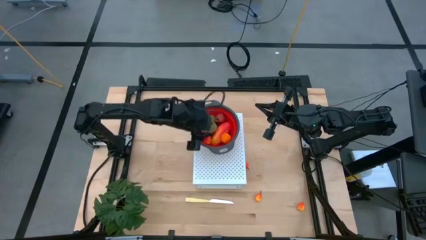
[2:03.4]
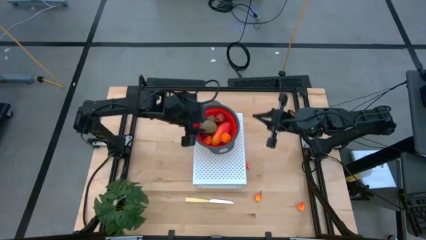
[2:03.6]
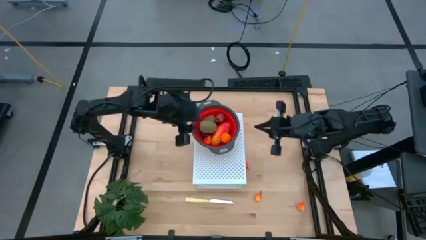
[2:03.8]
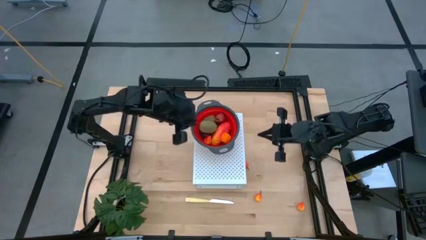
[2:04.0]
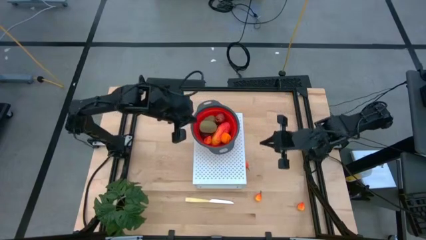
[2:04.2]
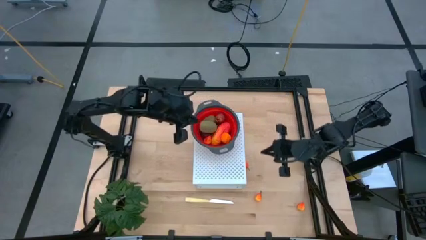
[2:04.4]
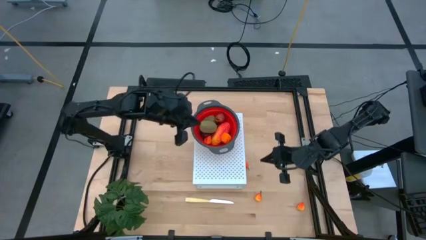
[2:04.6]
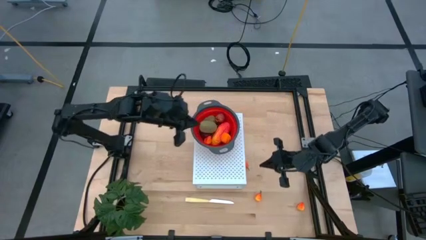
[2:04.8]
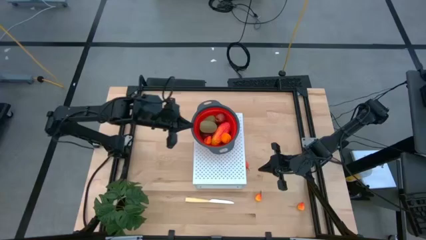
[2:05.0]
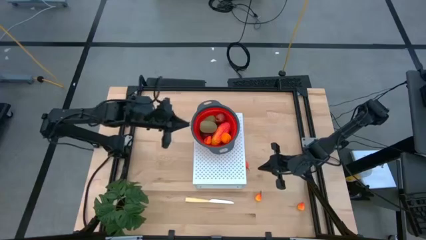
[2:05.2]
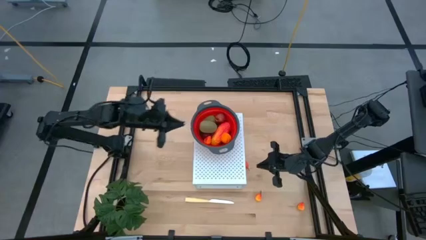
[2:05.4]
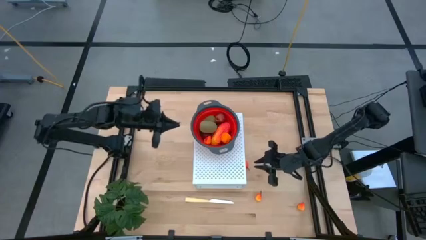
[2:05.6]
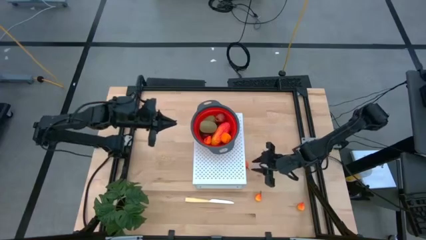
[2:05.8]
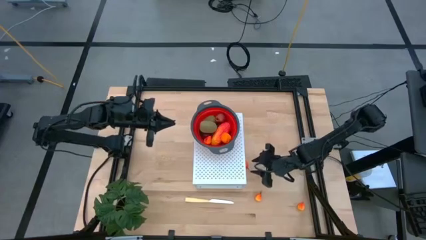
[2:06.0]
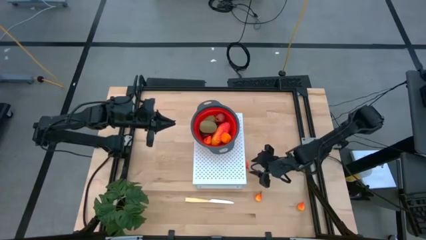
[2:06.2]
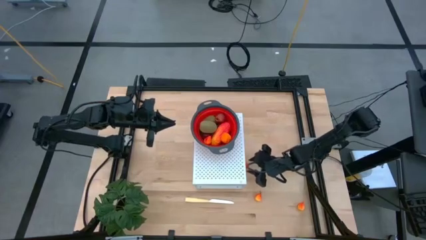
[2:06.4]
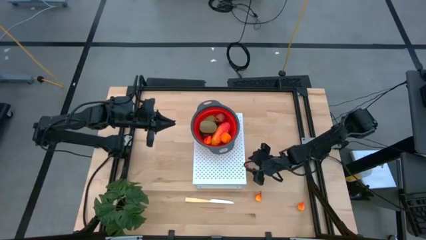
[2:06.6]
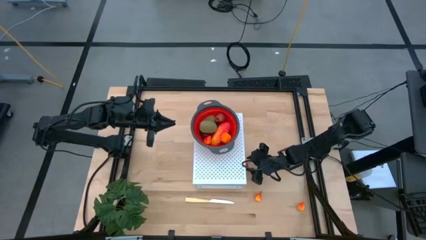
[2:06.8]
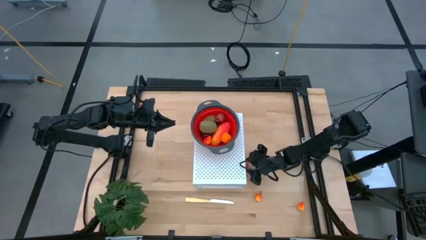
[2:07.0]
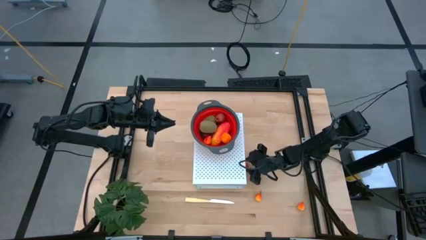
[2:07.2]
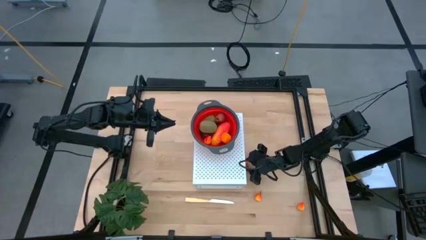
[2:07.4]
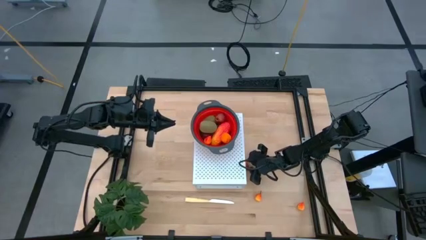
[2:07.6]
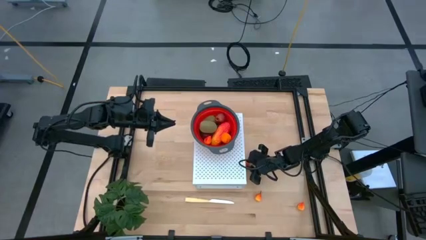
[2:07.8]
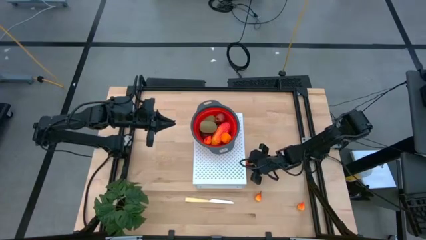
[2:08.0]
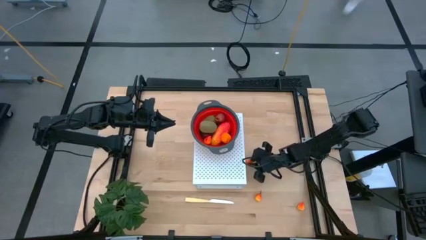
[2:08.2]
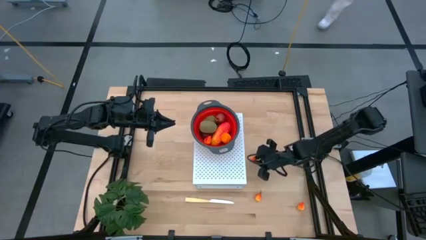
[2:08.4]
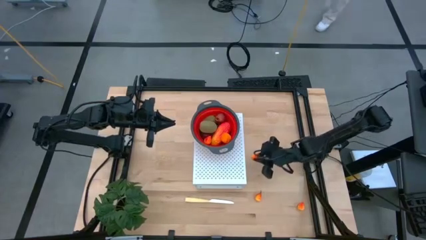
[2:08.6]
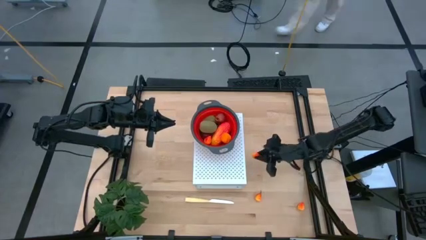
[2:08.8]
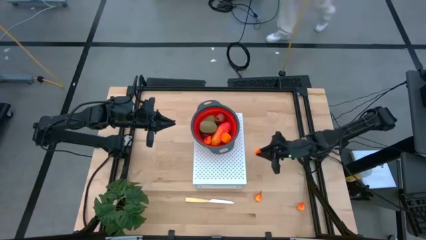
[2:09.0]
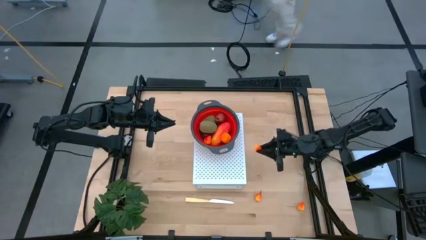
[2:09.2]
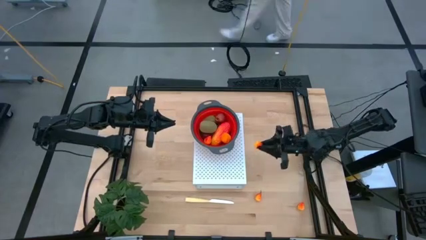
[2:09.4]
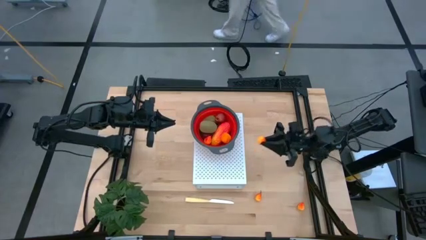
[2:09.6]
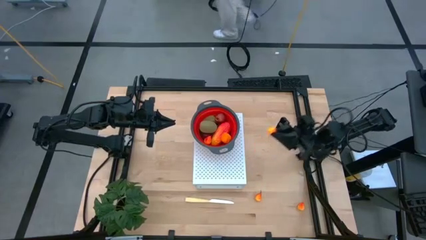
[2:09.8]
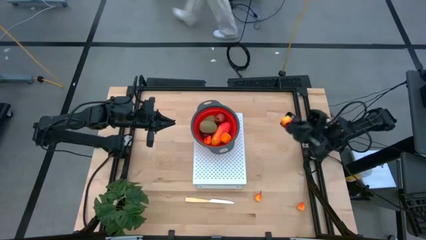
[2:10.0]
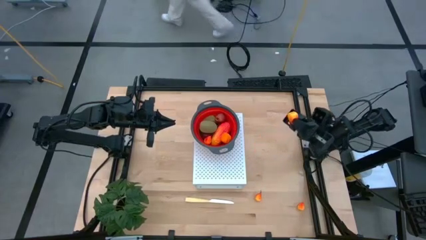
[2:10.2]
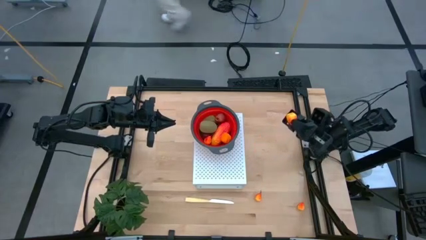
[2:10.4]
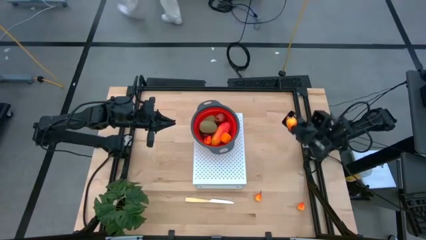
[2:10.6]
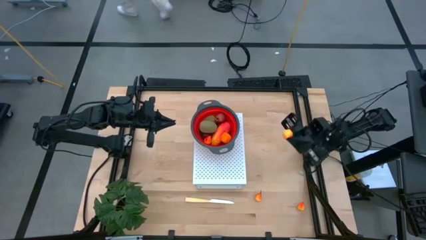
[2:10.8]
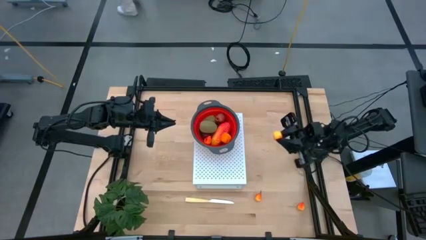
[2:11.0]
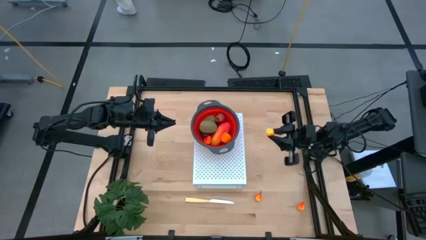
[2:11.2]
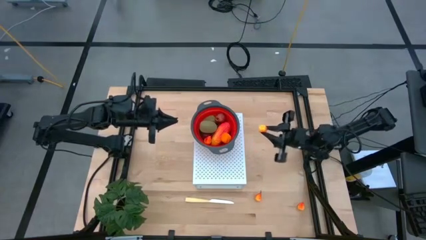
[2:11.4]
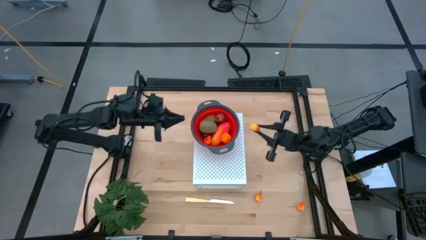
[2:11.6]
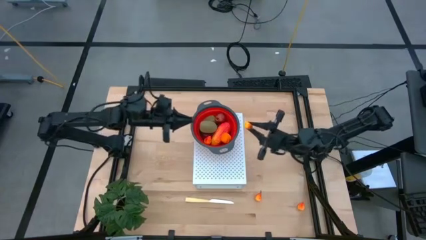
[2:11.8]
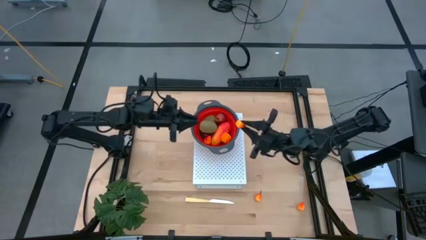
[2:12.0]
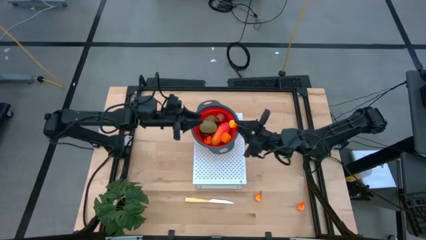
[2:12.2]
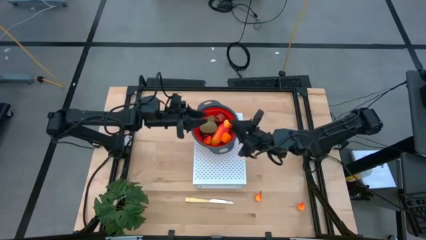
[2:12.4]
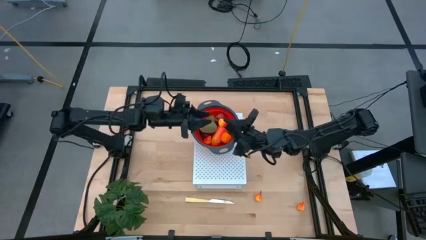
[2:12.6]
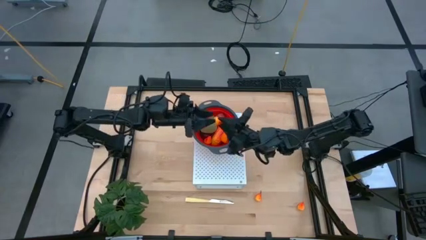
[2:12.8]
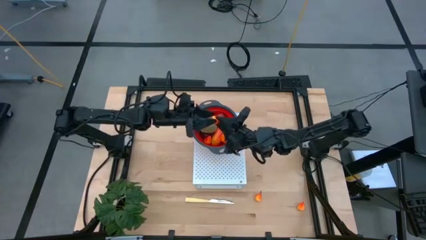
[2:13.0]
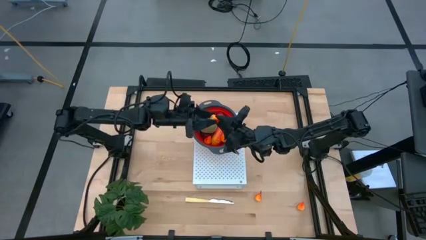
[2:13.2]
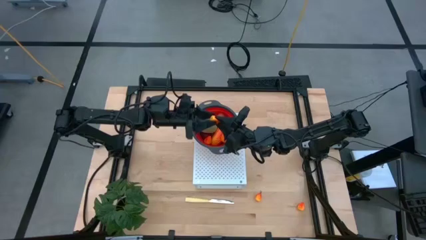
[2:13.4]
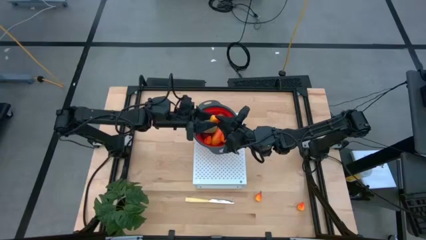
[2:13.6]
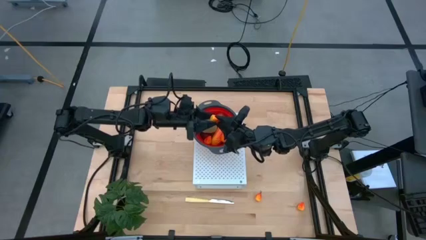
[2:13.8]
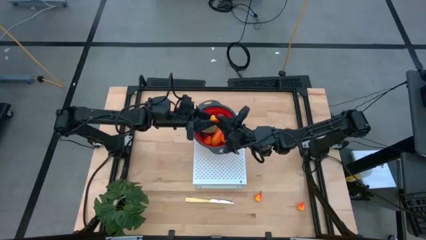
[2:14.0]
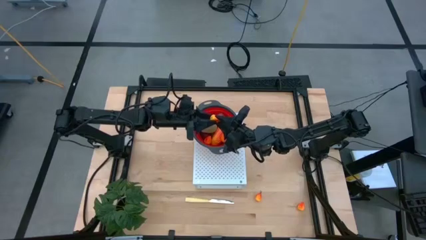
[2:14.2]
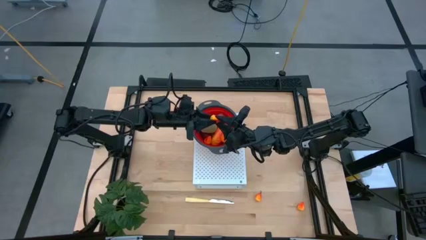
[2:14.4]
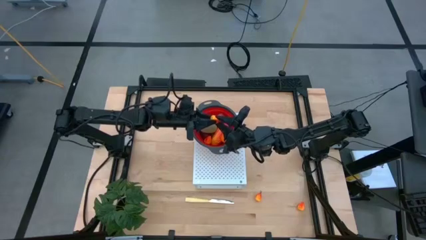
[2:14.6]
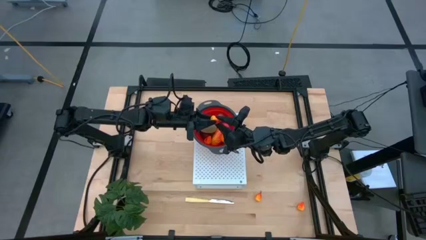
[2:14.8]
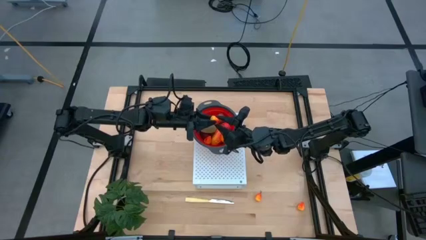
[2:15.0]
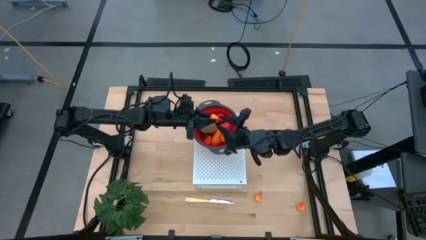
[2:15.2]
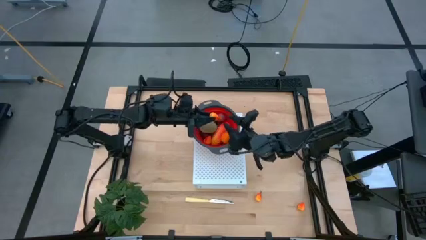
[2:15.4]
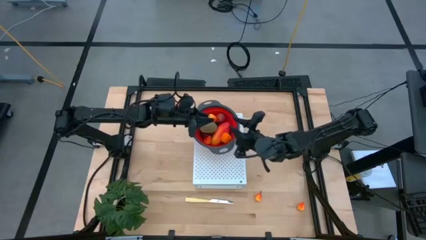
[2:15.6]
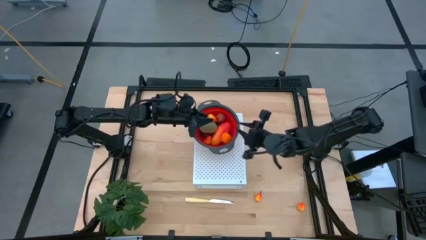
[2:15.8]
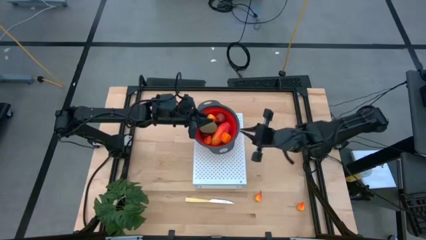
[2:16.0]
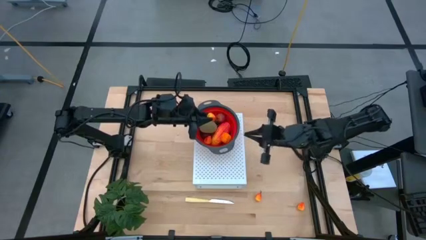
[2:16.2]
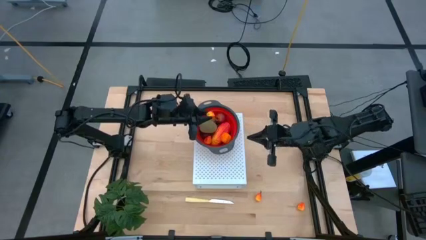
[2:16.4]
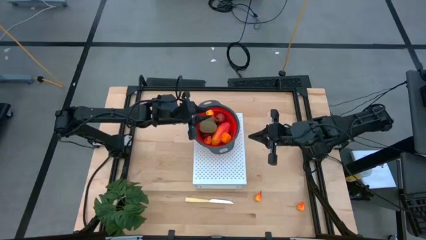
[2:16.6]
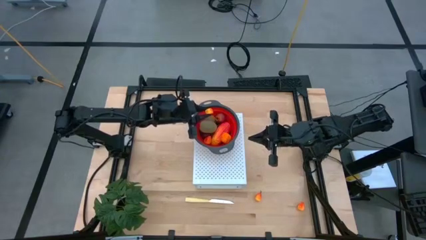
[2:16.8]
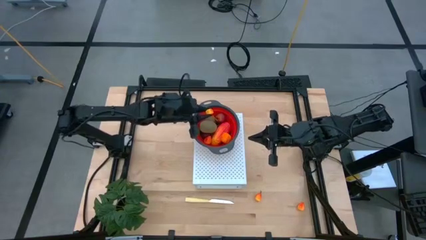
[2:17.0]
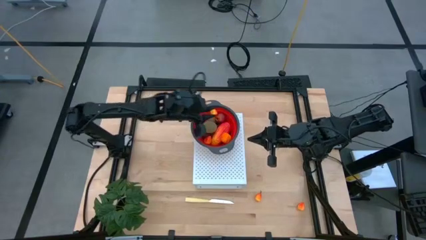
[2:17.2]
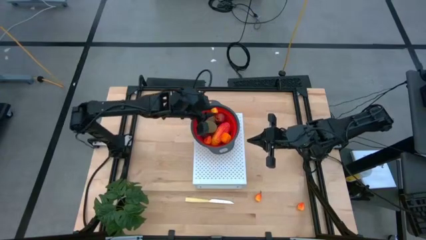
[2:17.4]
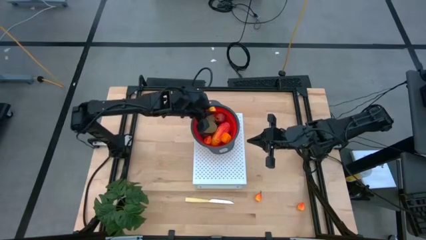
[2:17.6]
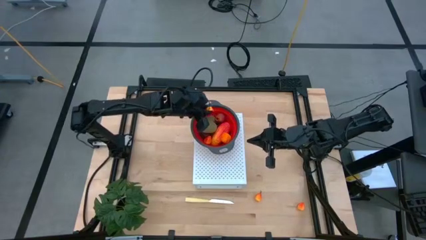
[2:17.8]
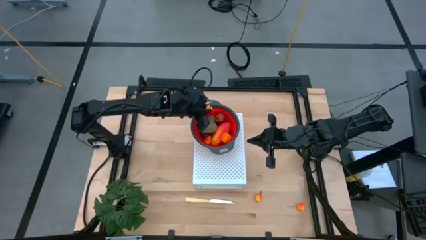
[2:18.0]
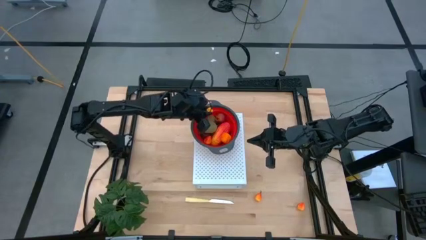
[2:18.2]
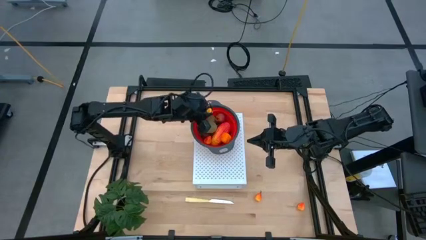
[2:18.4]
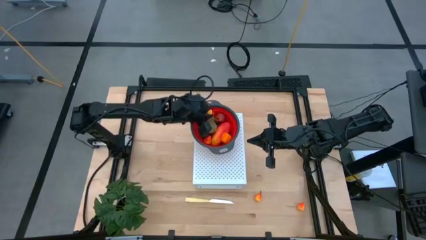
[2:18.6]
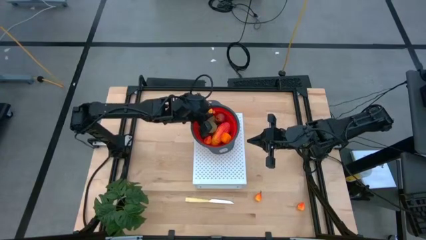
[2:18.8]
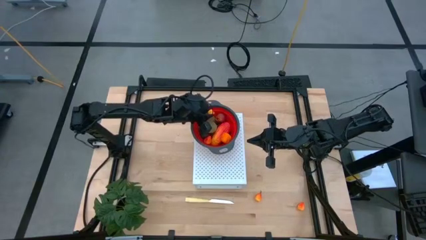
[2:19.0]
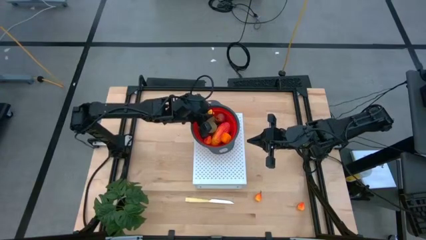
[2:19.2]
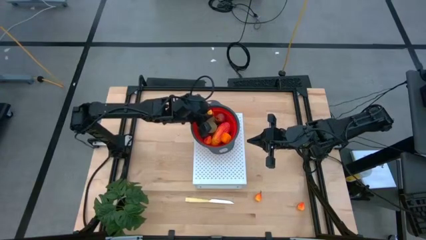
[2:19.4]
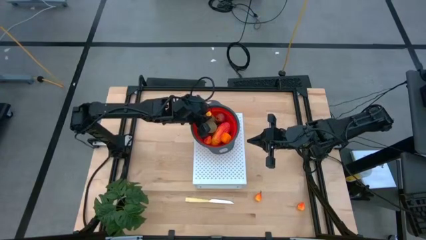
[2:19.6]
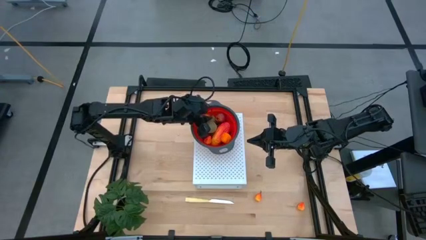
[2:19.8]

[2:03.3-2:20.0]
Task: Pick & Place Fruit
Put the peach into the red strainer bowl on the shelf
